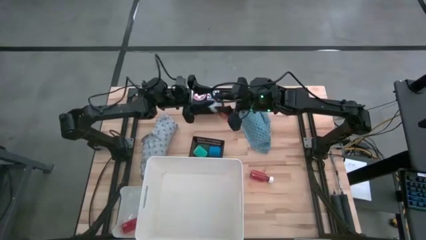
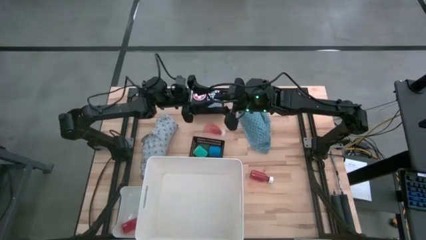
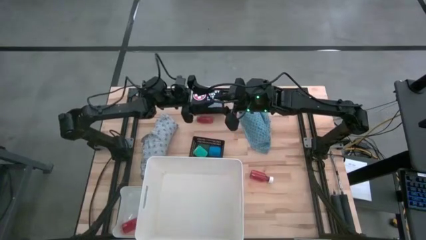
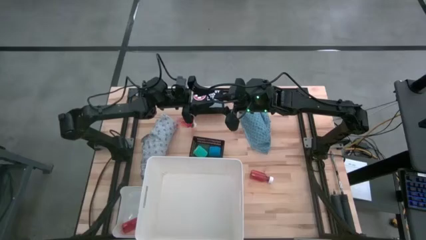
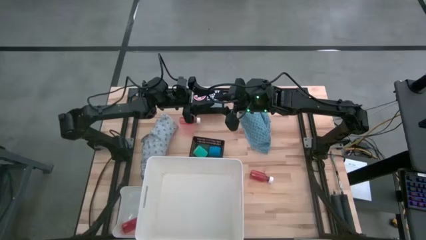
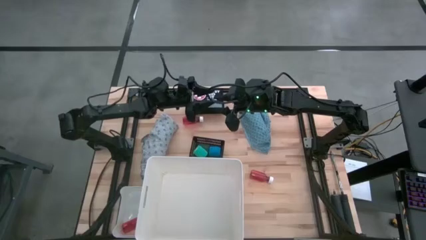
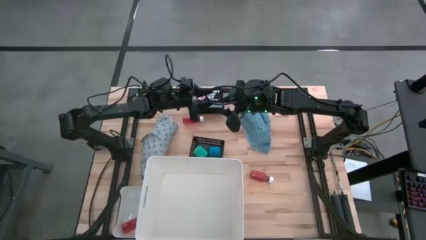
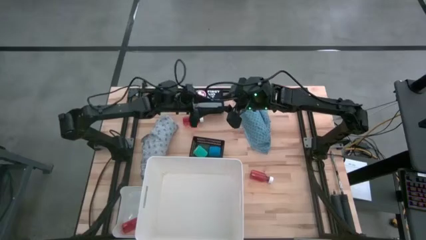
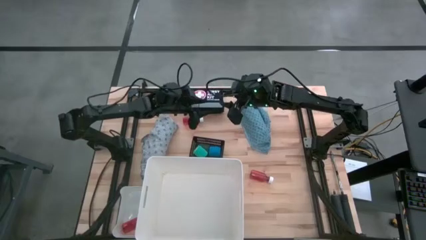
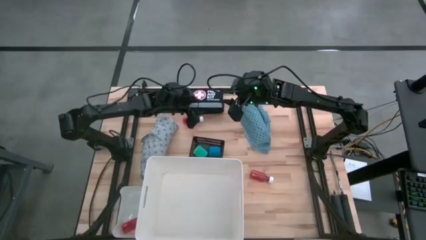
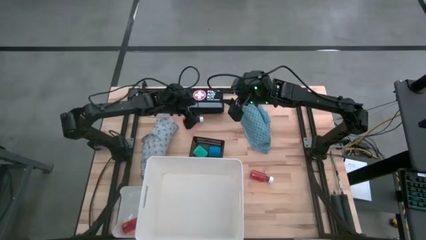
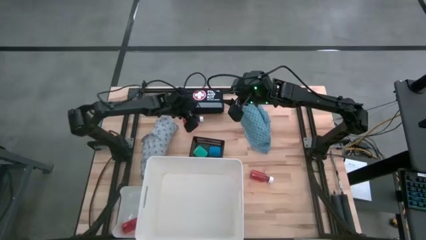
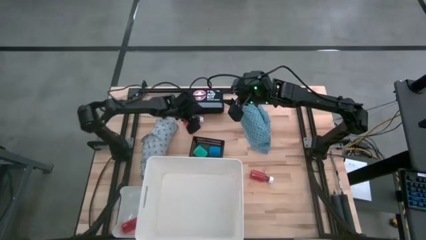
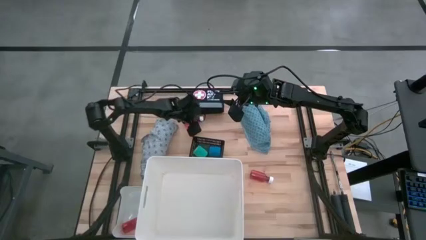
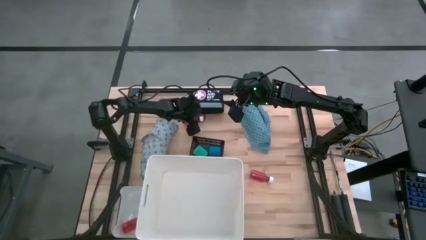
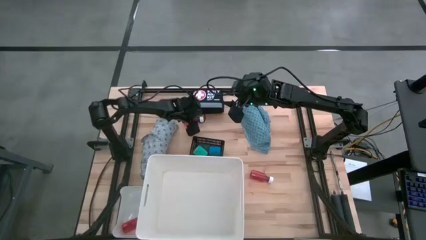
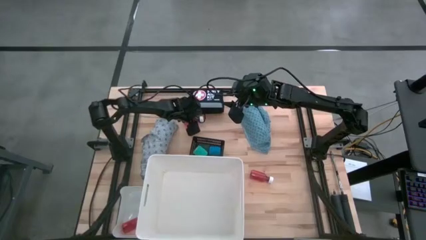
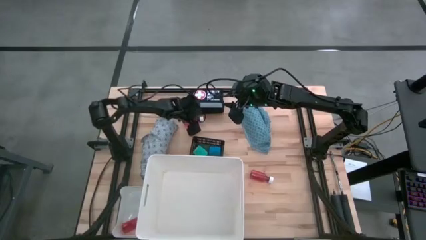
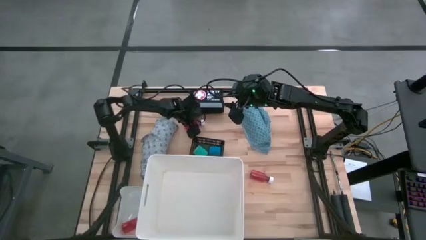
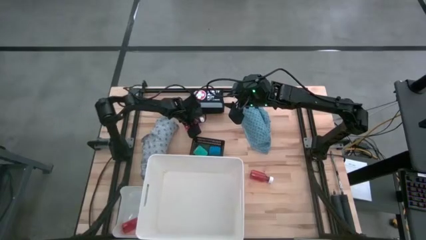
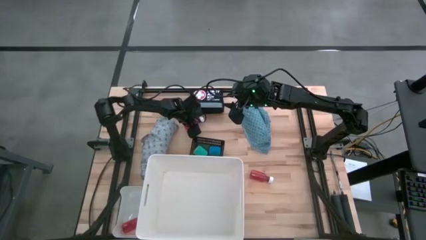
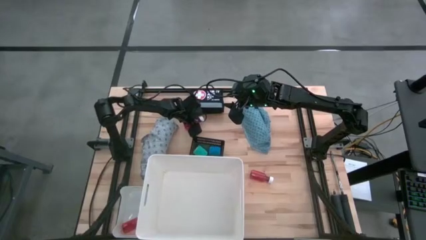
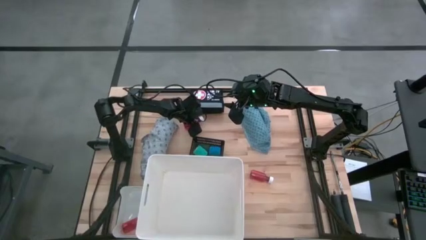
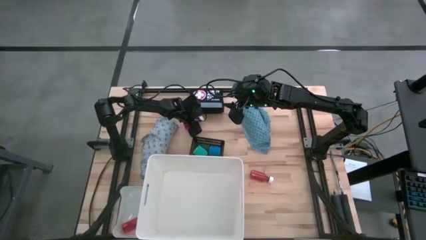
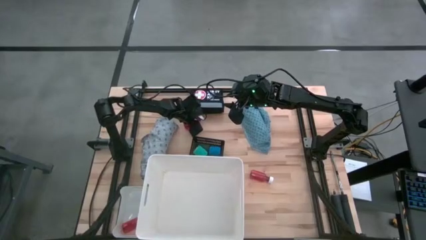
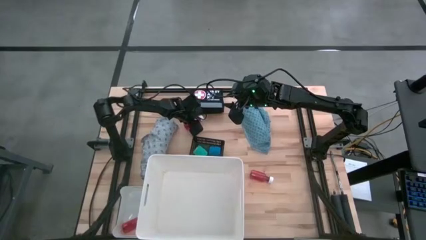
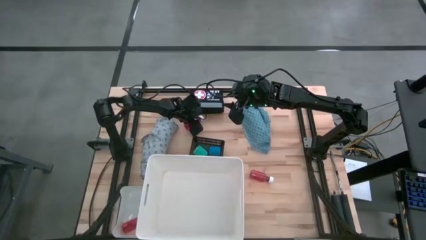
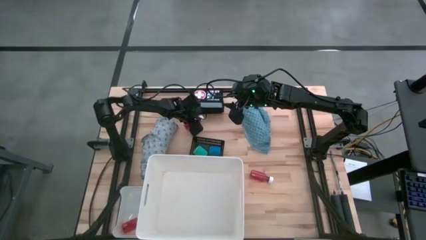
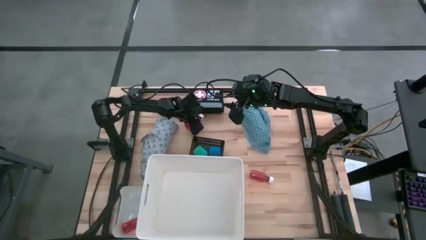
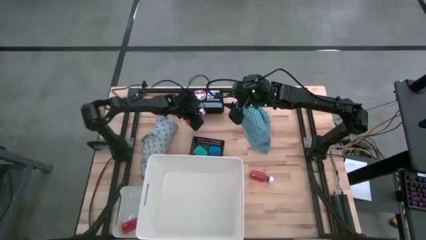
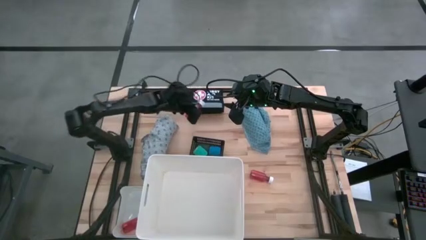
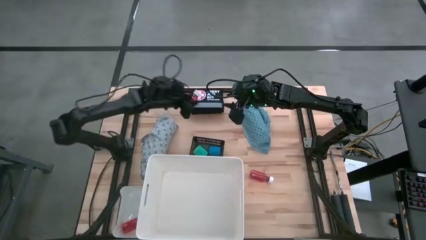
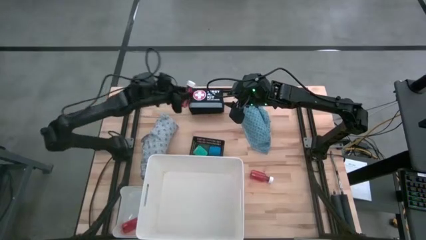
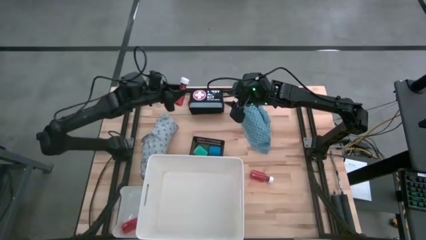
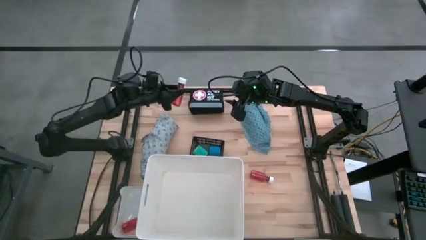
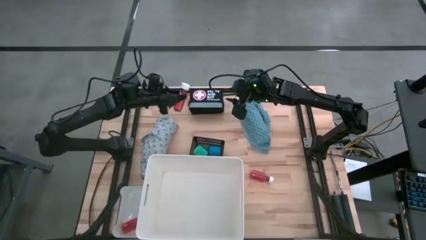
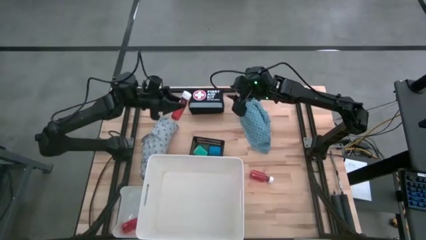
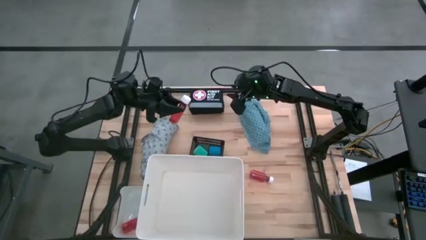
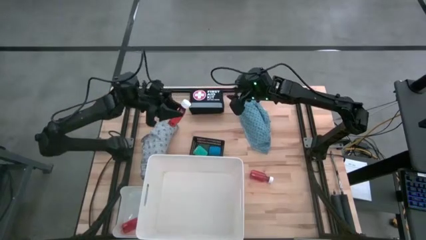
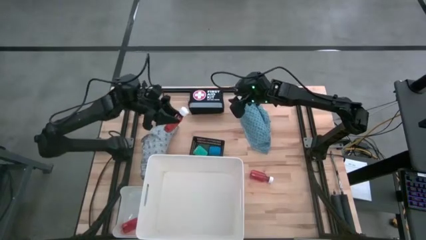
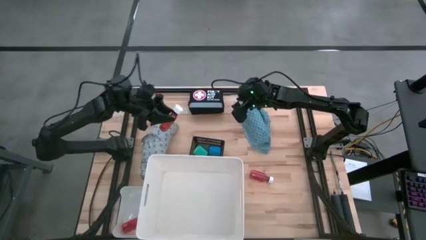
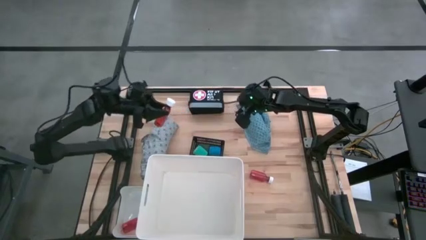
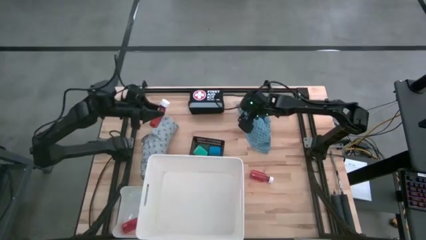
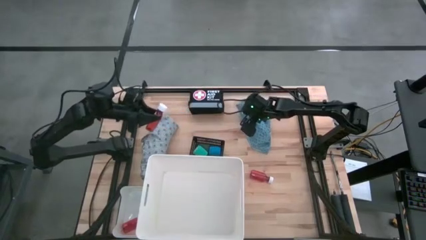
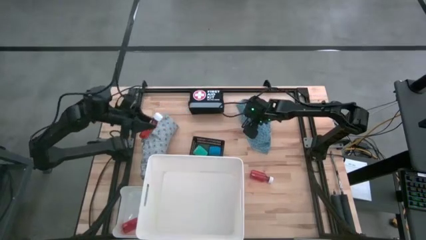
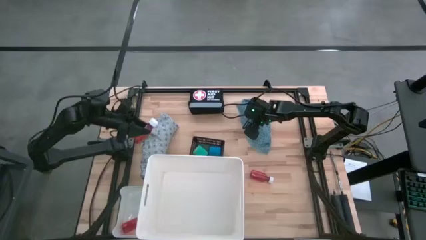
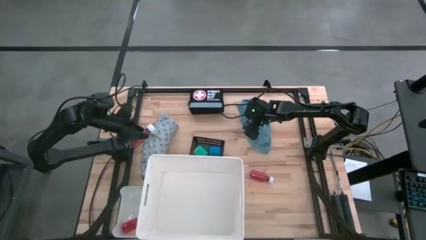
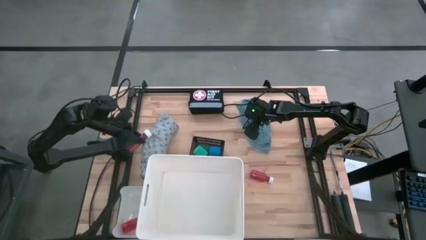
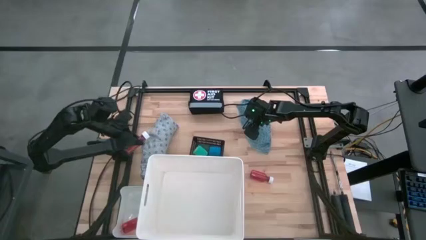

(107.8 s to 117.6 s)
Task: Pick & Place Medicine items
Put the right red medicine bottle into the white bin

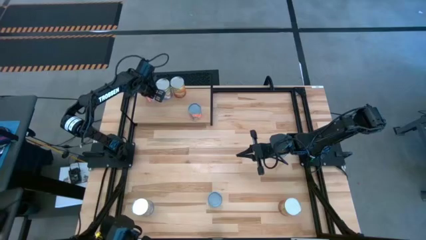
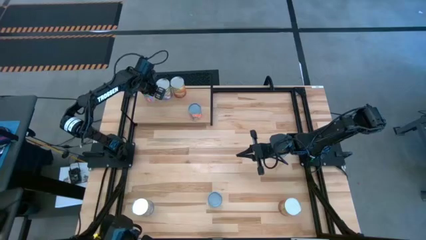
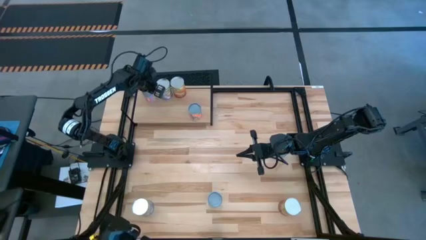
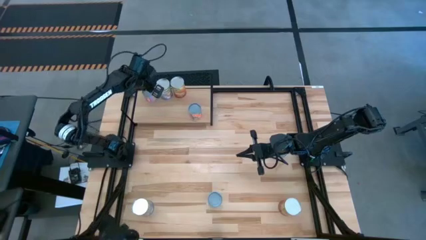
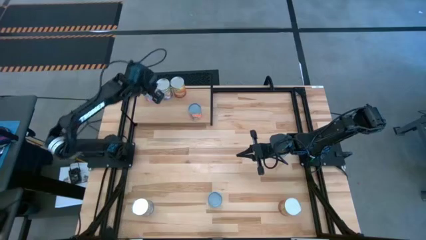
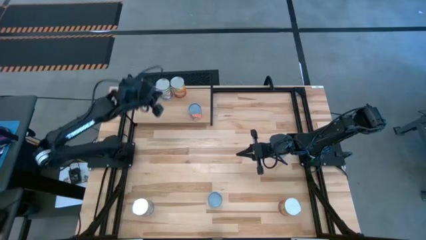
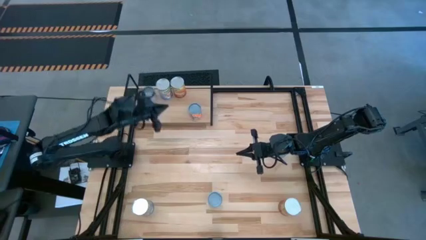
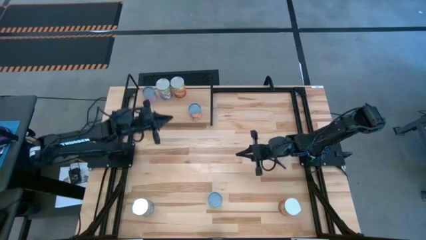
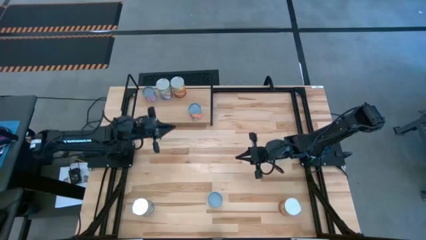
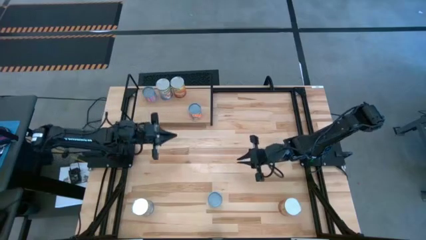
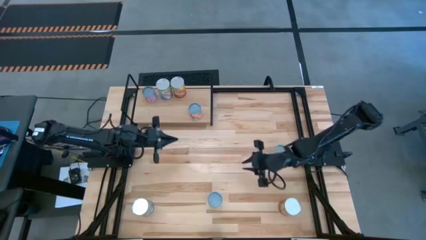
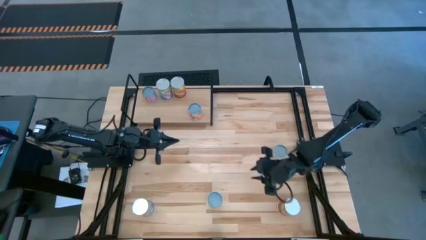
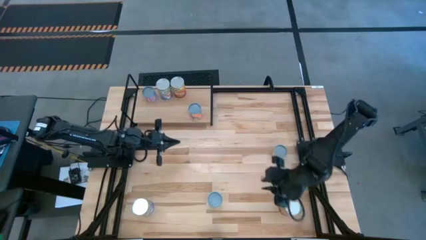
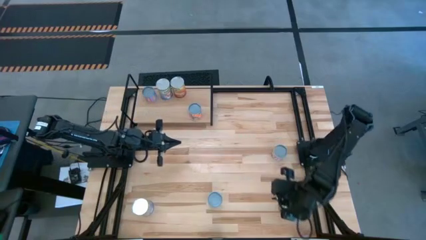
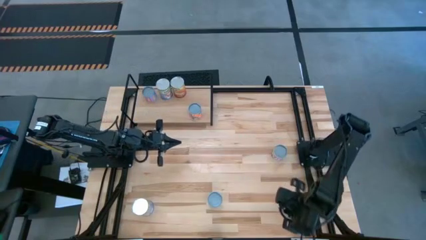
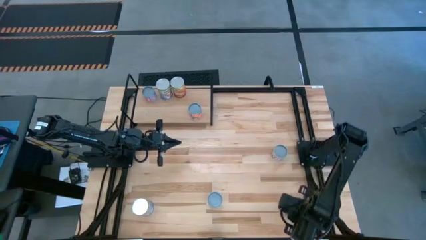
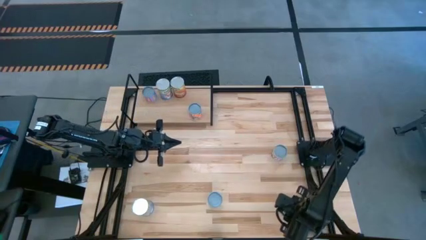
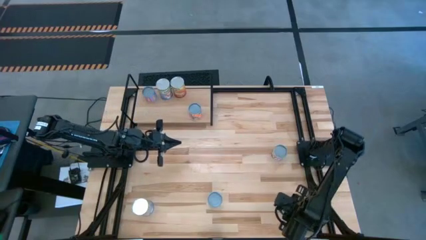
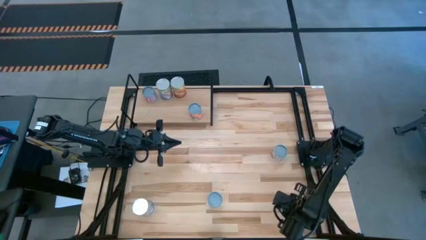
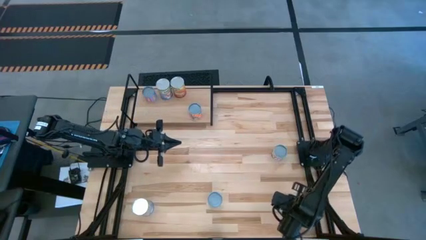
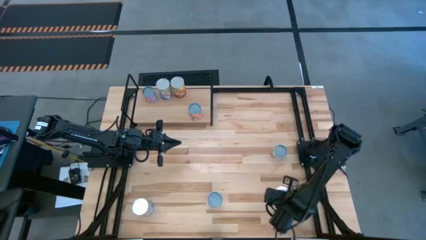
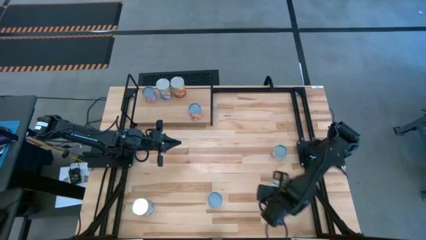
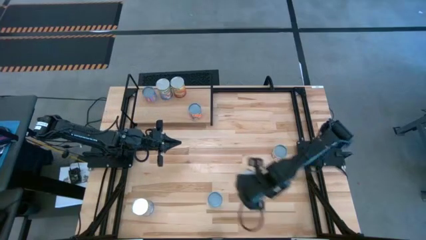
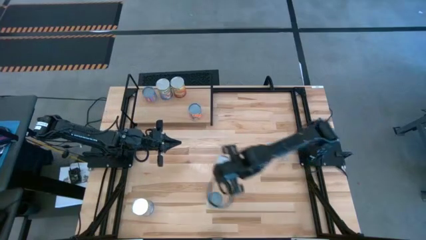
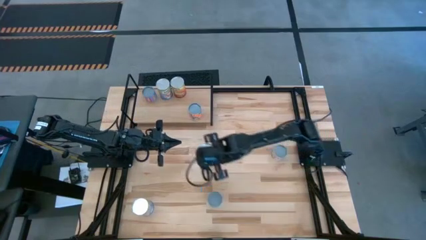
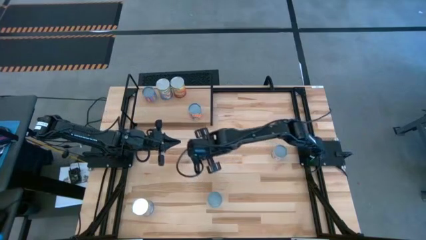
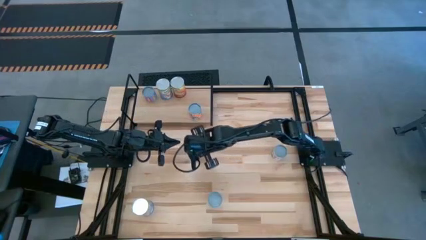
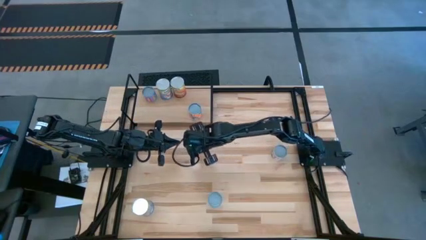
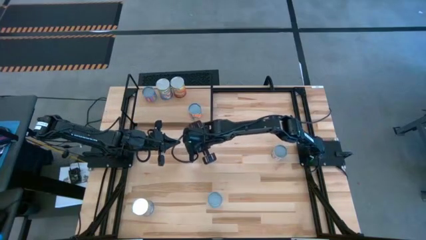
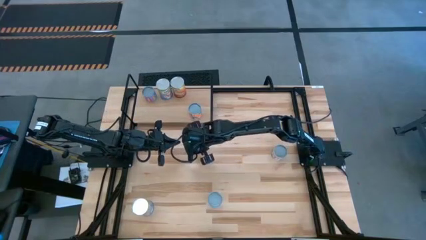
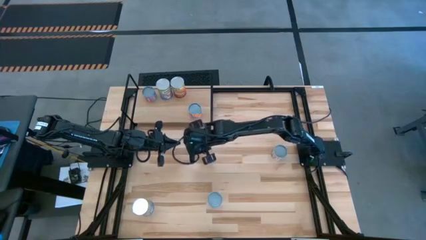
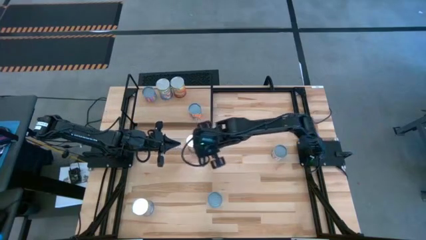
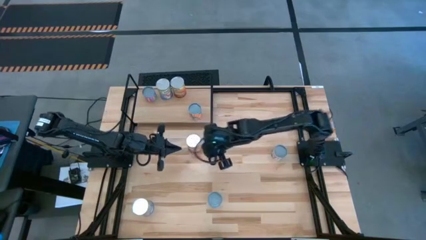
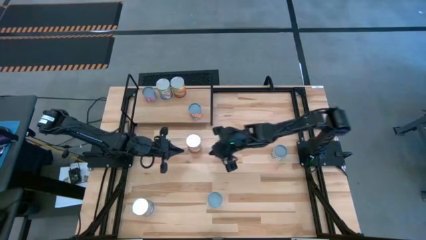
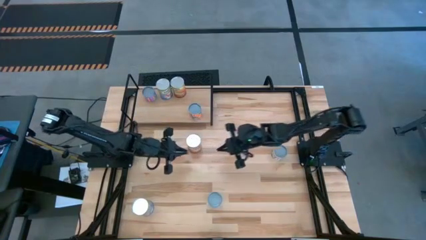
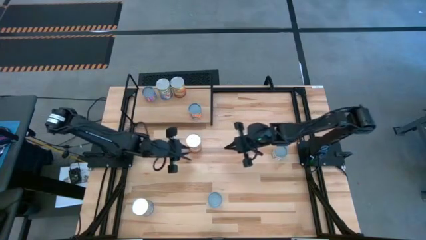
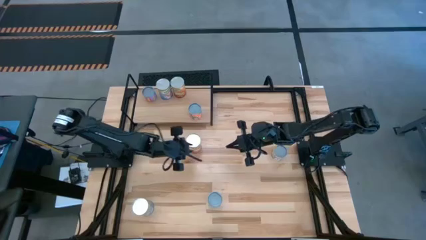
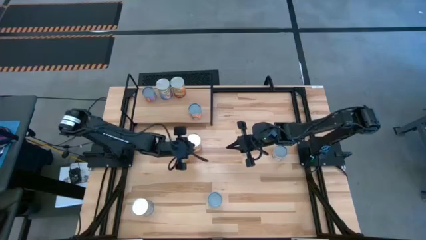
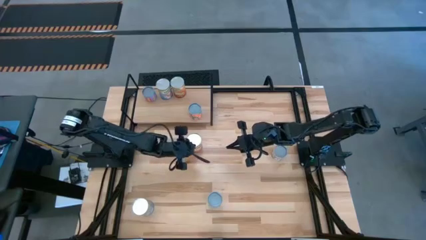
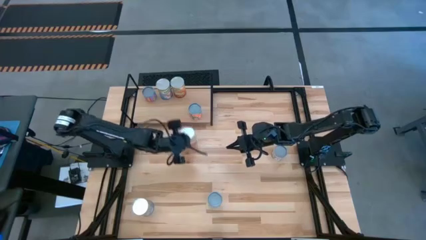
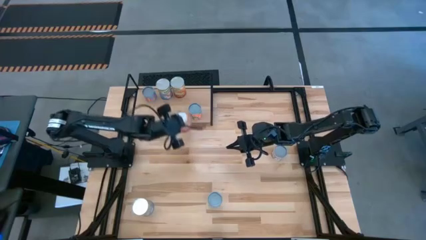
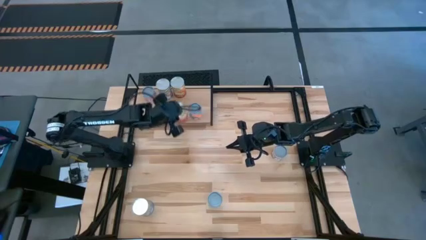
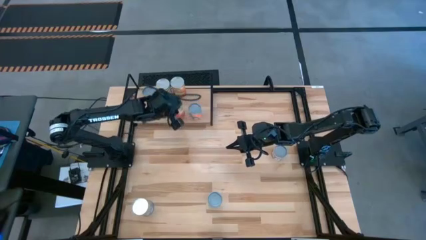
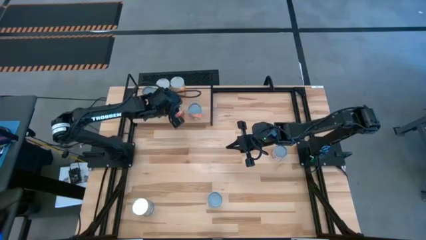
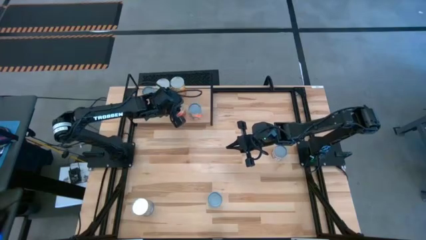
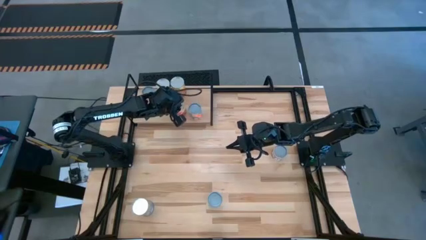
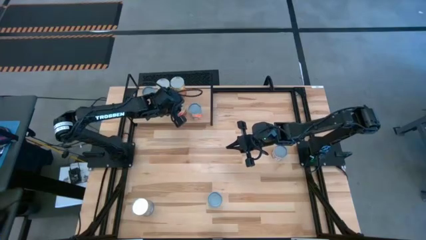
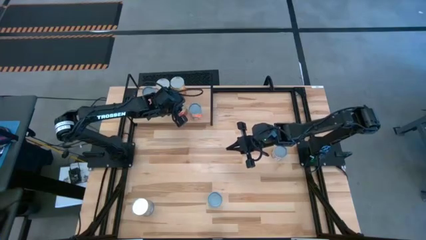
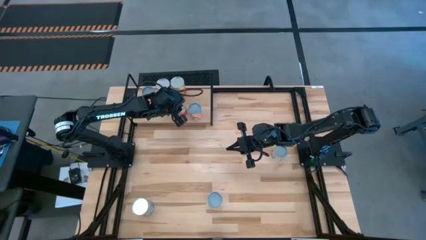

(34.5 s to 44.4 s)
Task: Pick and place cans onto a shelf
Put the canned corn on the shelf aligned with the other canned corn
